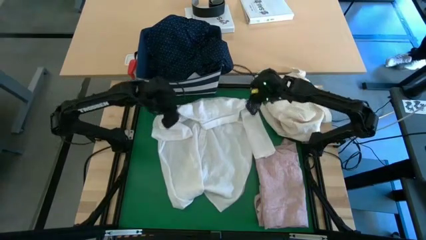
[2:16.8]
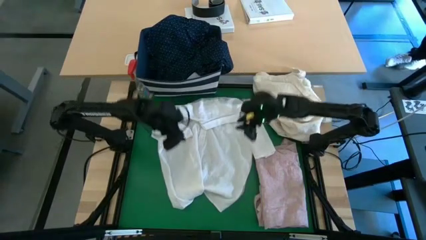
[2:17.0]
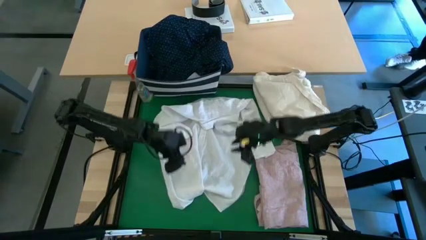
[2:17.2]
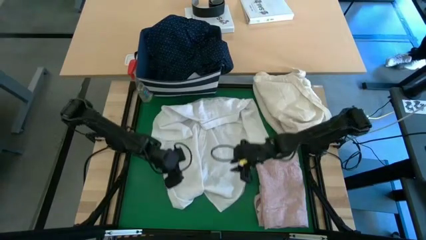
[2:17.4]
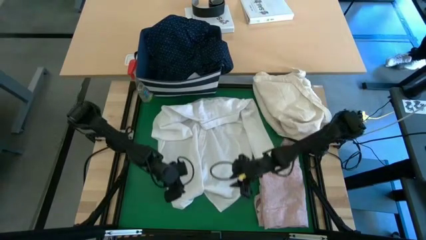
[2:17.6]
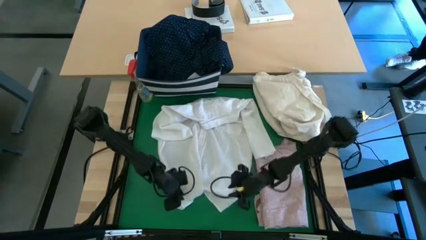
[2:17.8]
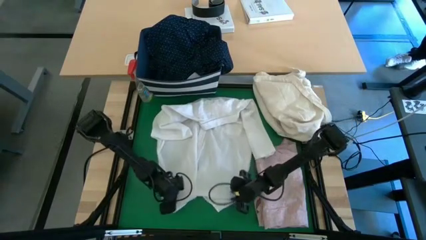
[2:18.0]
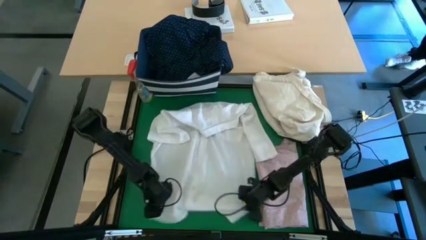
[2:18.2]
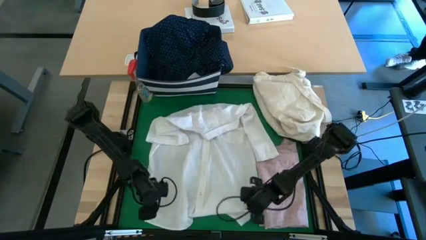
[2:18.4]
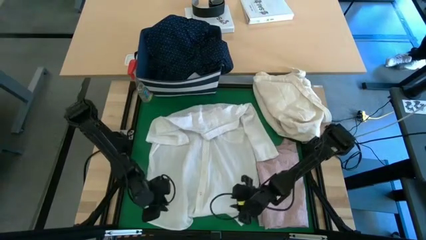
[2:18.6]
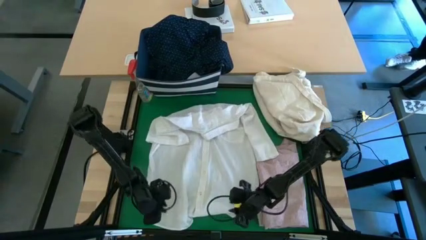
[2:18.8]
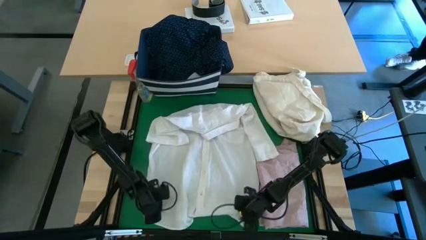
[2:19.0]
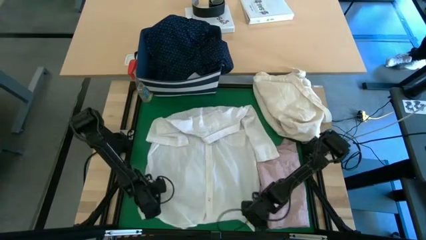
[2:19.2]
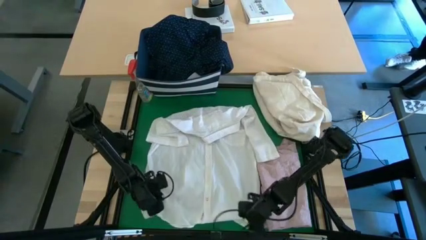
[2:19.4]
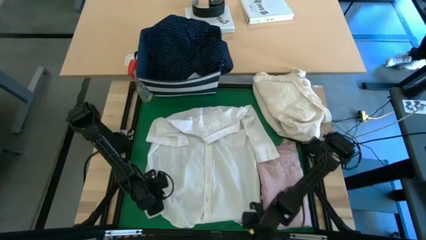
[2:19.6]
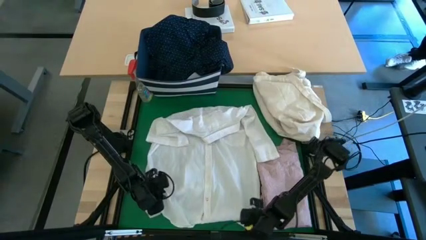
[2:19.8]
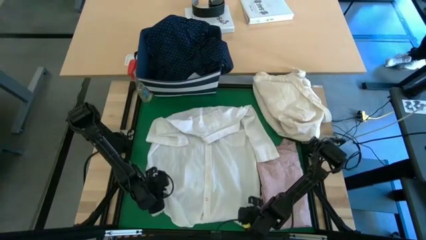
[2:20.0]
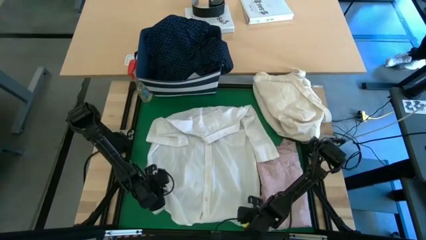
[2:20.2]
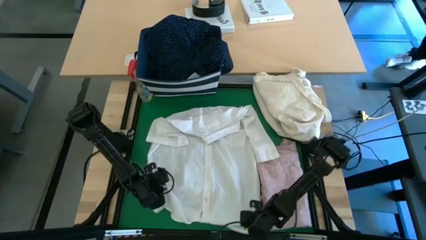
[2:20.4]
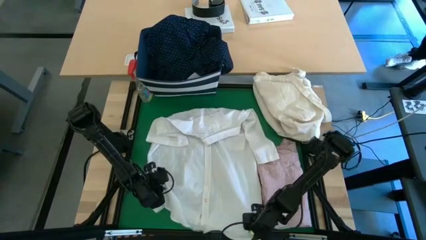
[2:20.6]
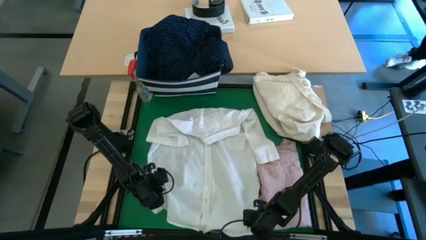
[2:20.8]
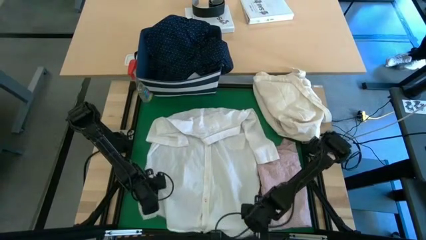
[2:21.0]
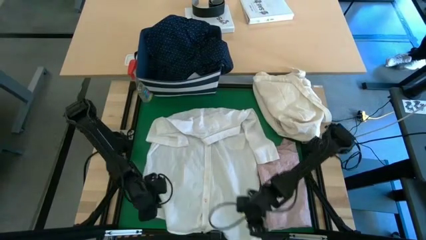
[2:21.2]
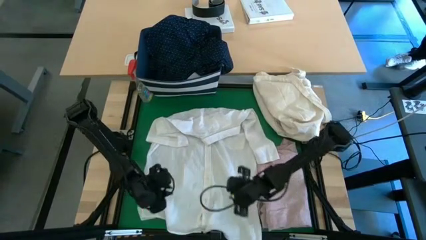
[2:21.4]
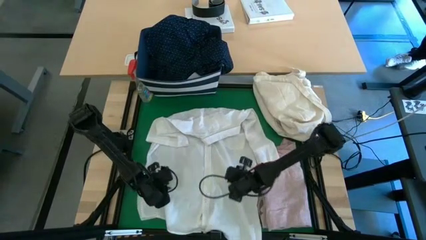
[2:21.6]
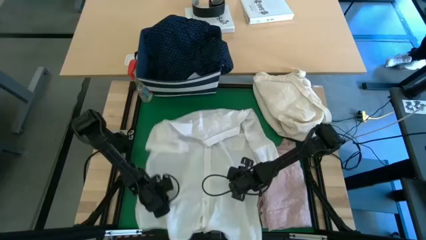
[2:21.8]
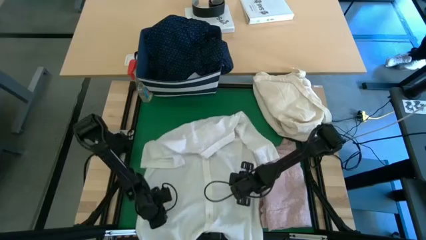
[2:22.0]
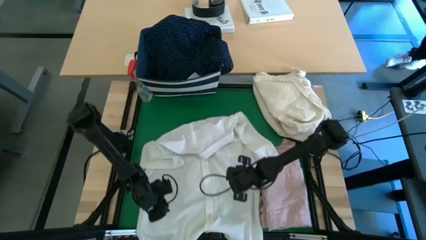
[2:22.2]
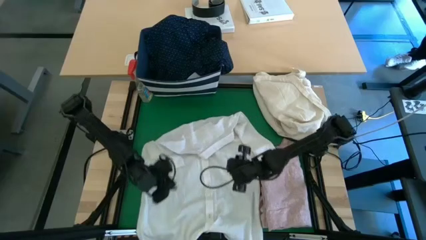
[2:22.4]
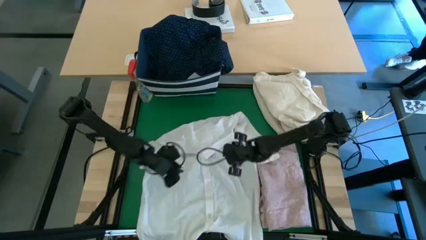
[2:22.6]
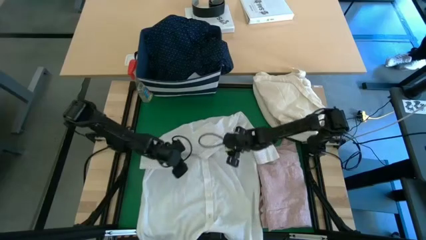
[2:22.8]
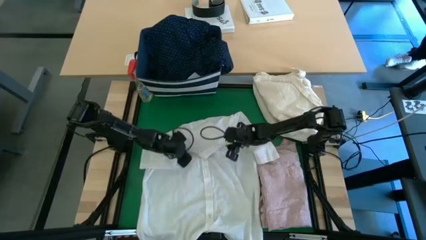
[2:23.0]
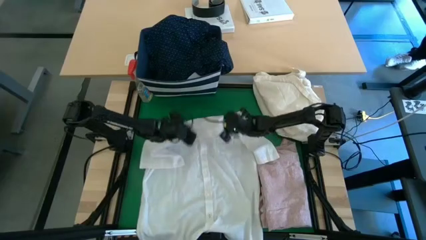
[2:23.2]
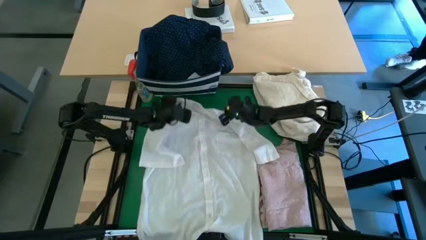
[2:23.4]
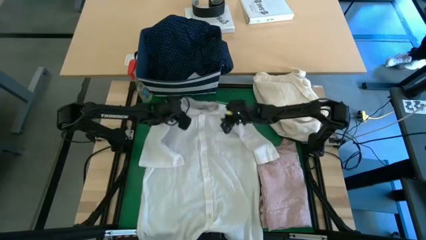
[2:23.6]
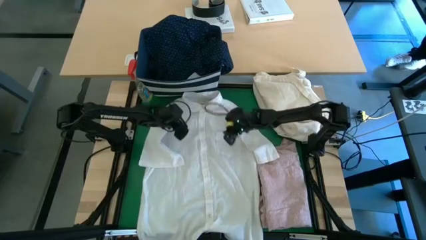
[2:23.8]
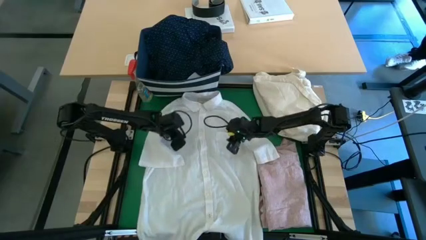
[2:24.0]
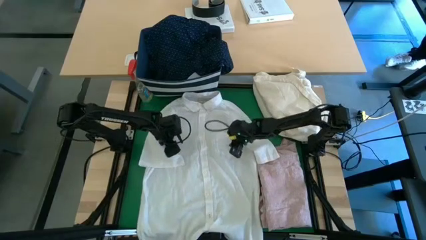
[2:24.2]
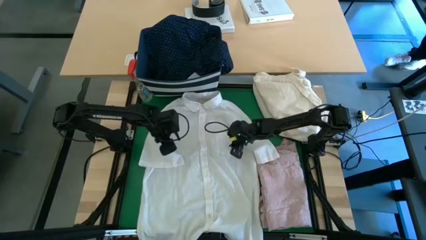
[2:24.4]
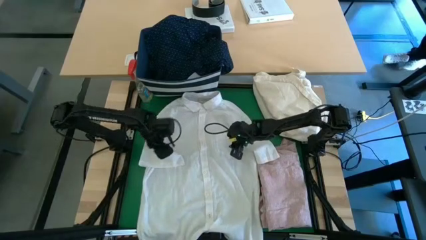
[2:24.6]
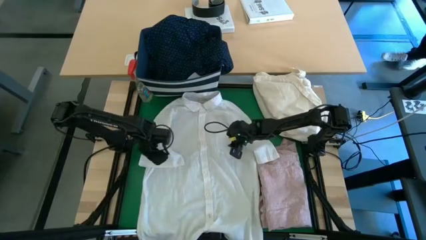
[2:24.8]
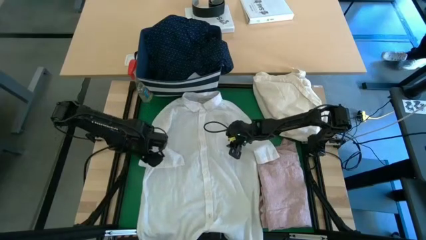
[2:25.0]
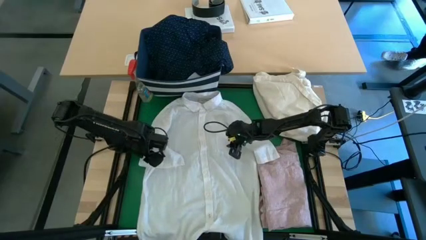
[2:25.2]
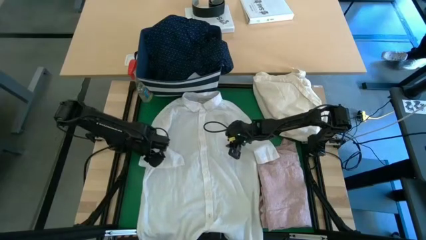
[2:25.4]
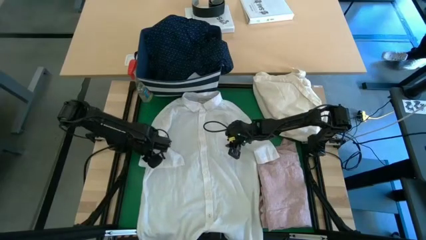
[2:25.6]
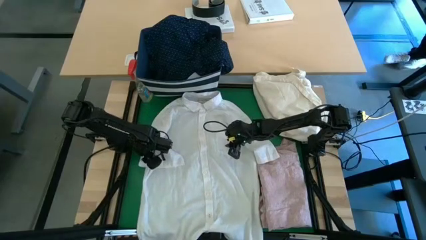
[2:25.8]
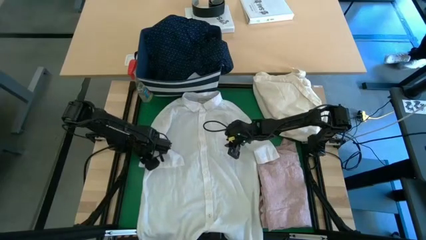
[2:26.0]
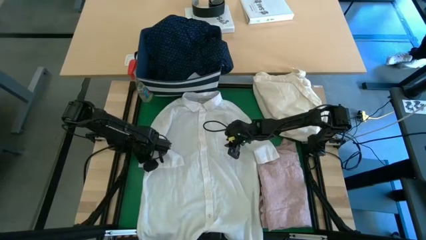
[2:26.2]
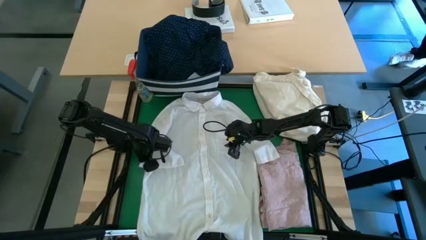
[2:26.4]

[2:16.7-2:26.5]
Task: Fold laundry
Fold the white polo shirt

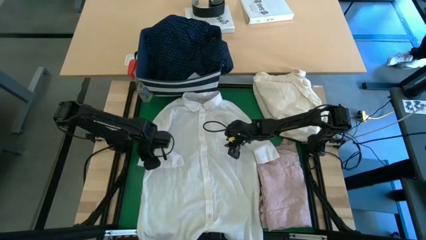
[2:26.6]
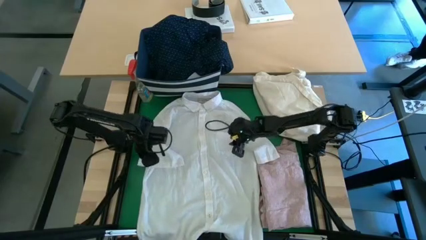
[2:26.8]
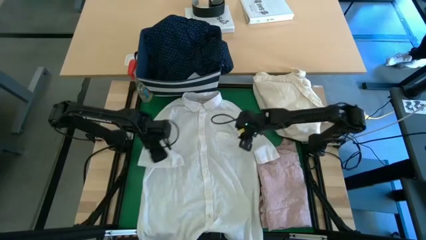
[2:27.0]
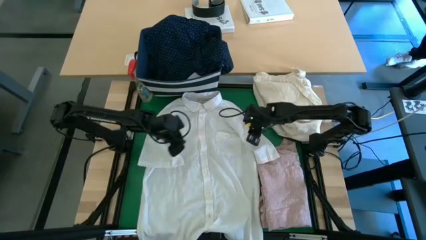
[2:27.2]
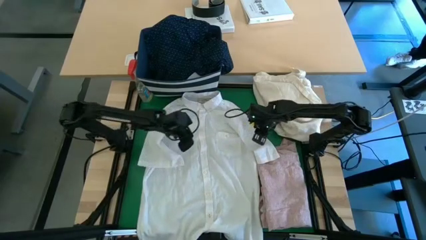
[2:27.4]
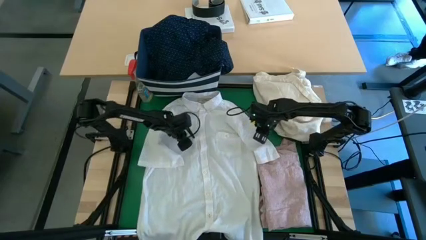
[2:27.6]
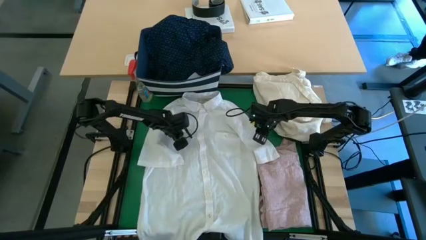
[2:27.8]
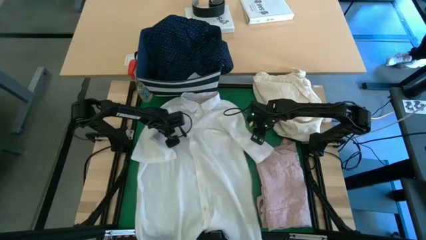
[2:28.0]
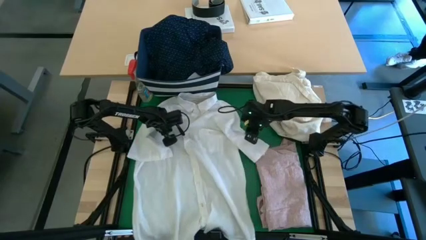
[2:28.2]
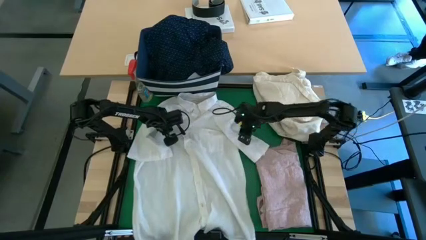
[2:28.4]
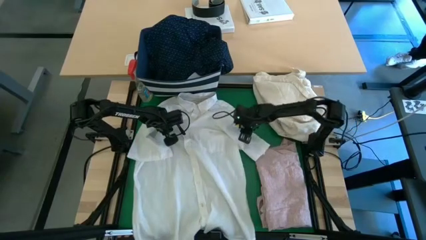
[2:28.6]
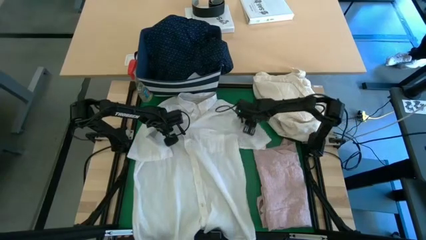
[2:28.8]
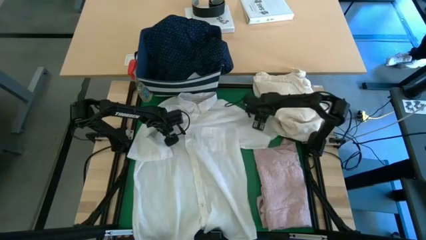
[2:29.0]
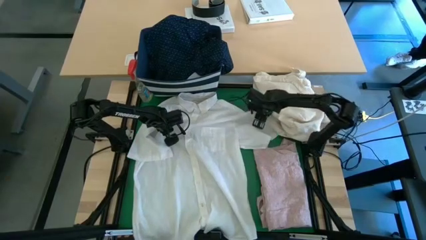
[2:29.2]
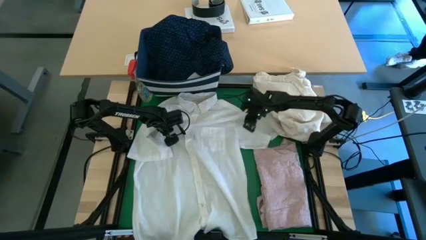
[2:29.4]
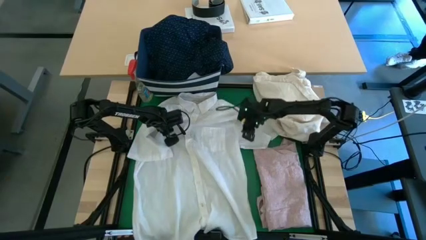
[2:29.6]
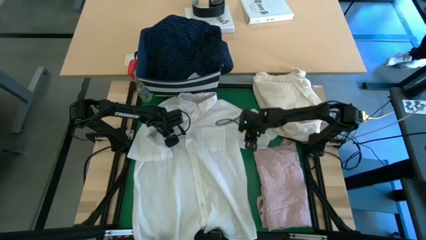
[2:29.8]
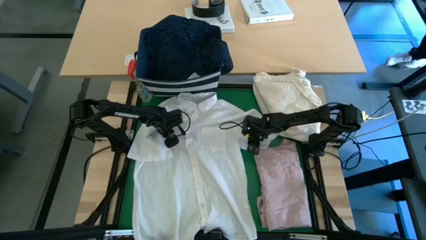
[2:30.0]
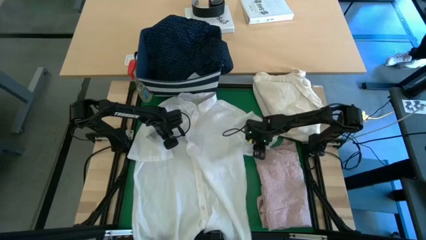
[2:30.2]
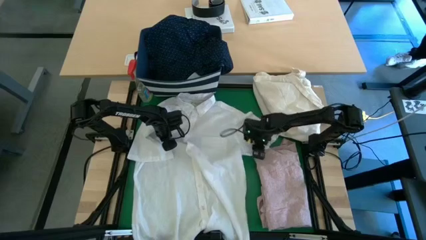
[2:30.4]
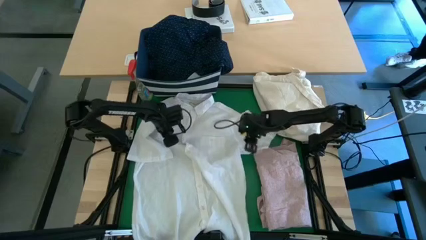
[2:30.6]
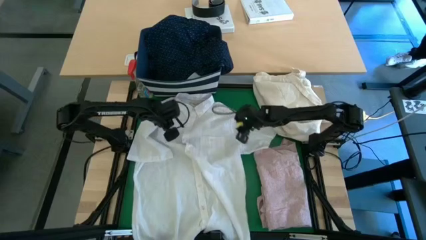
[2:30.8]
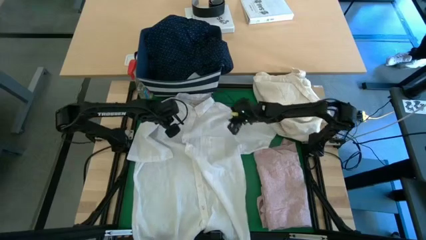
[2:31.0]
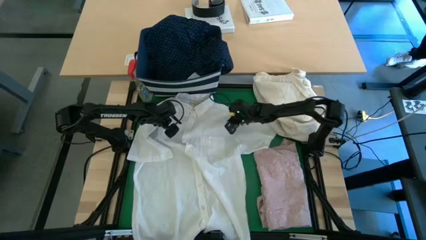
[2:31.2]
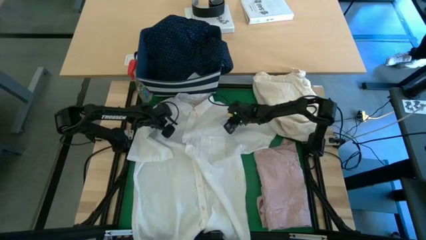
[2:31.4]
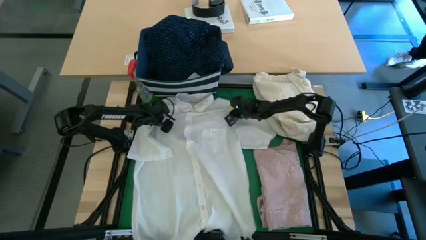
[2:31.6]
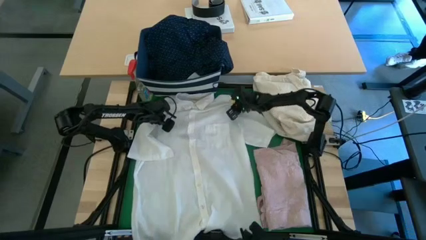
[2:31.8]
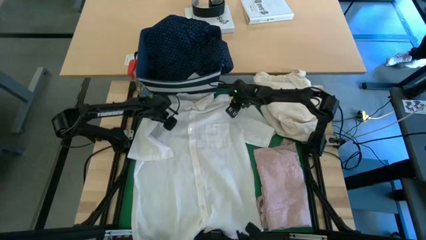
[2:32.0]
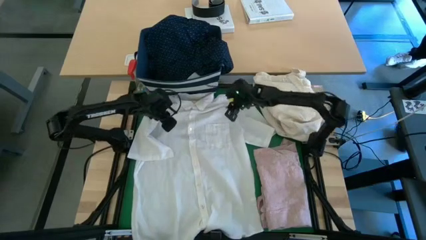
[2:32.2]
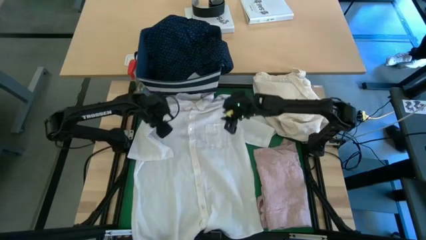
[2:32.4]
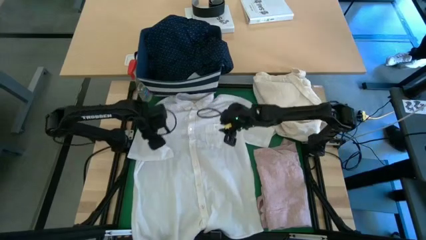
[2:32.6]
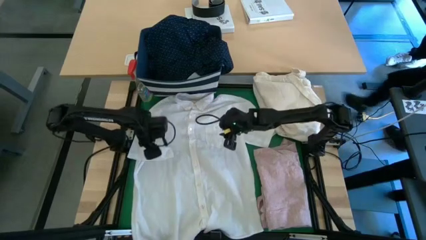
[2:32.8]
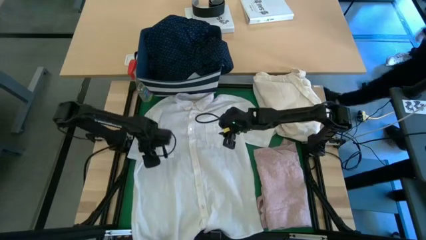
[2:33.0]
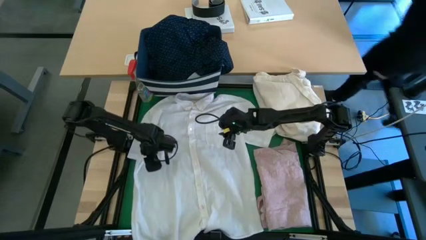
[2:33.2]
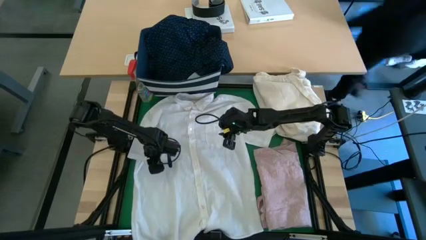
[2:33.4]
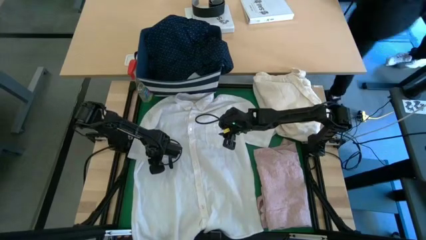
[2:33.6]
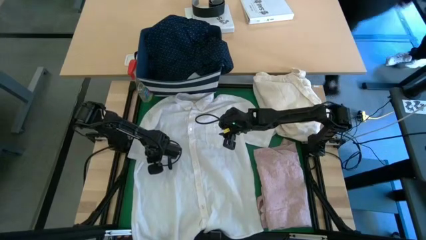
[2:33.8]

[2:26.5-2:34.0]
Fold the white polo shirt
